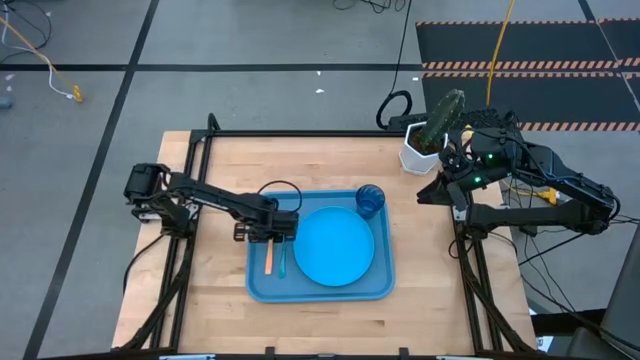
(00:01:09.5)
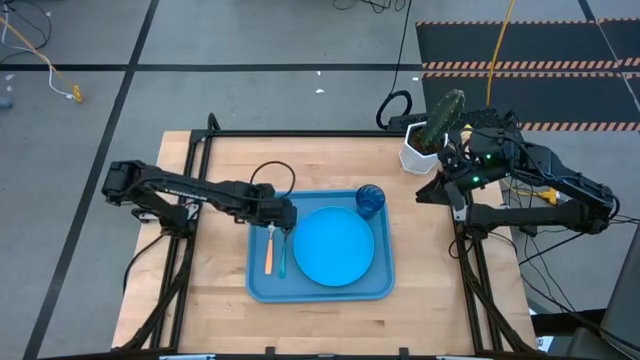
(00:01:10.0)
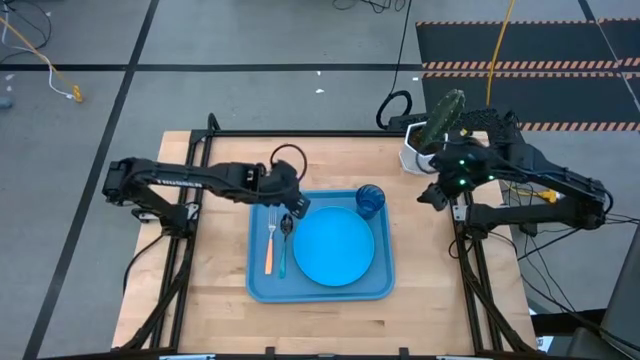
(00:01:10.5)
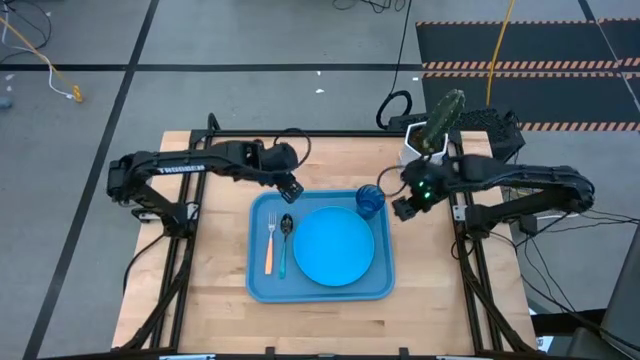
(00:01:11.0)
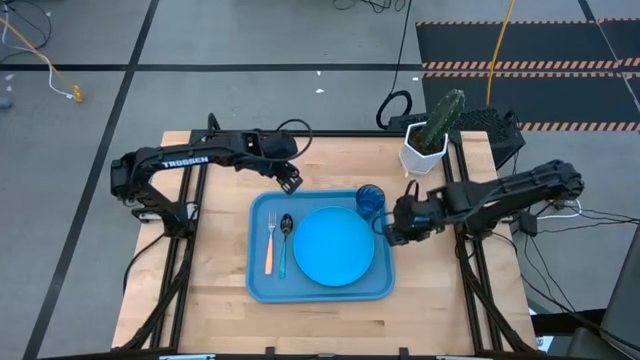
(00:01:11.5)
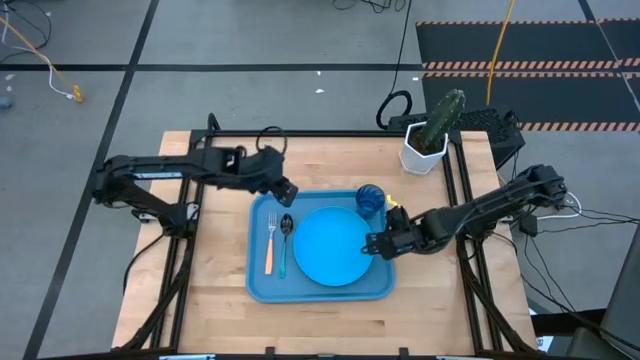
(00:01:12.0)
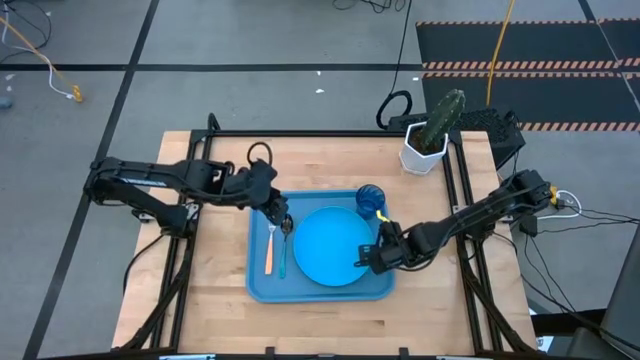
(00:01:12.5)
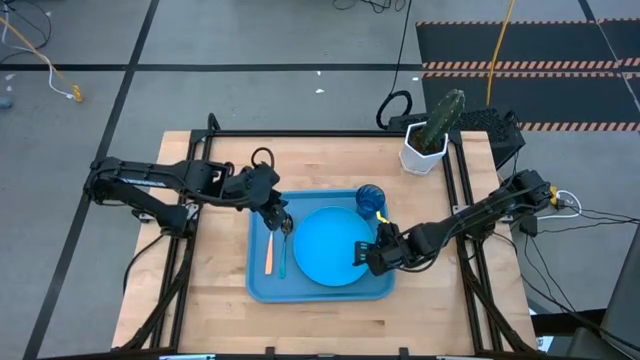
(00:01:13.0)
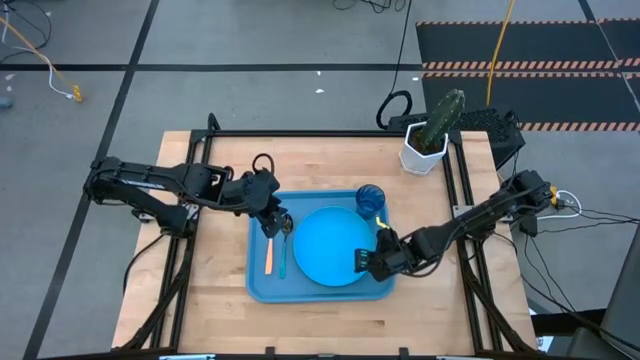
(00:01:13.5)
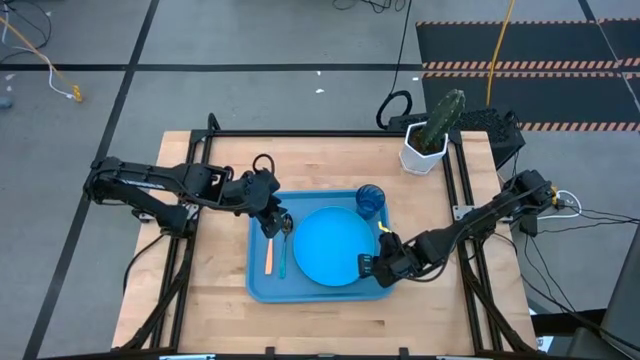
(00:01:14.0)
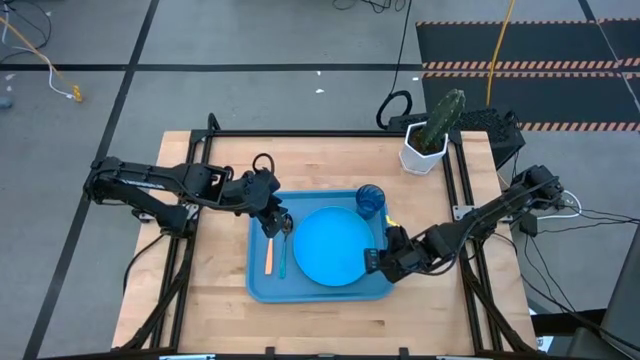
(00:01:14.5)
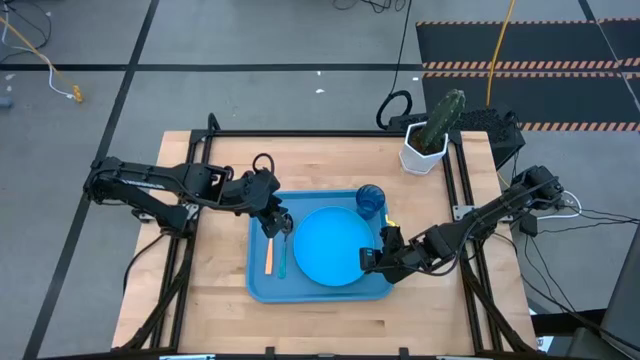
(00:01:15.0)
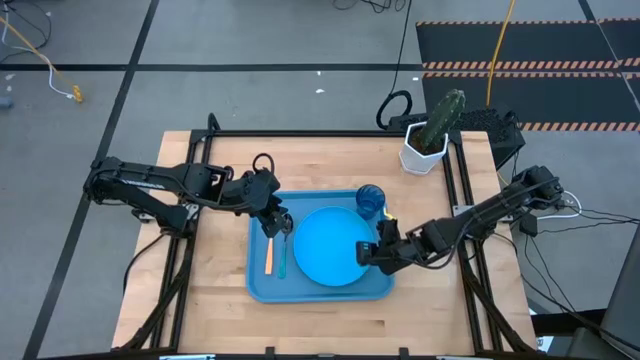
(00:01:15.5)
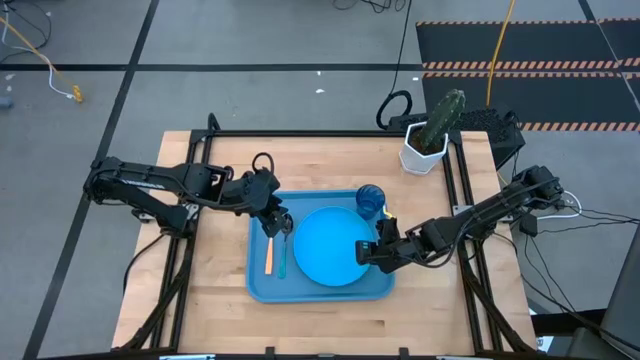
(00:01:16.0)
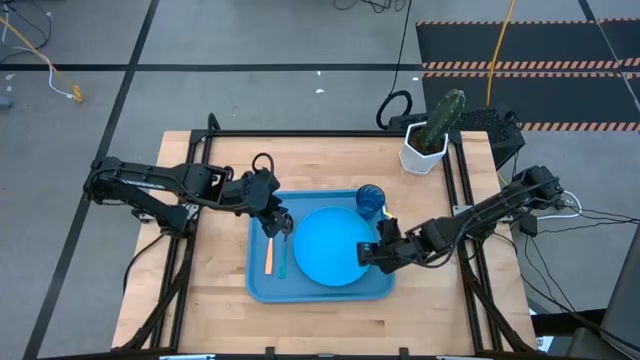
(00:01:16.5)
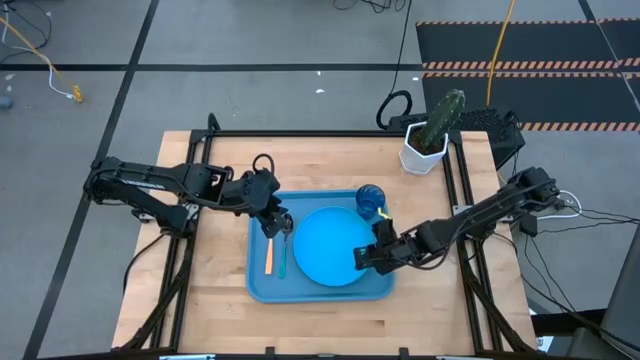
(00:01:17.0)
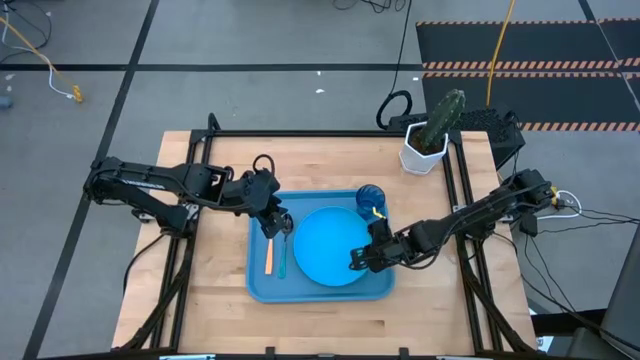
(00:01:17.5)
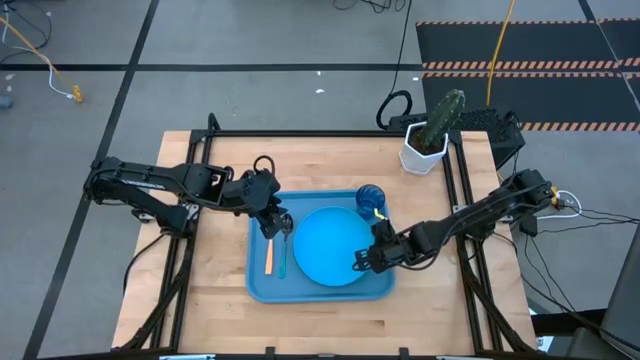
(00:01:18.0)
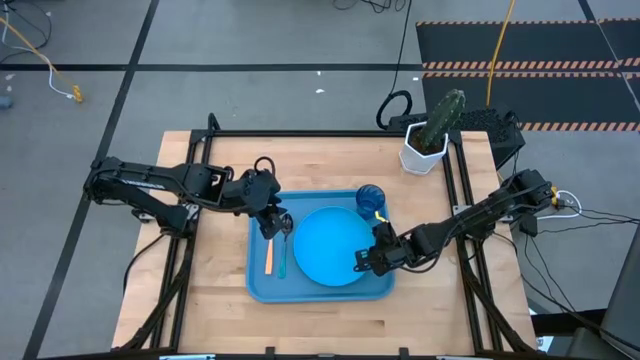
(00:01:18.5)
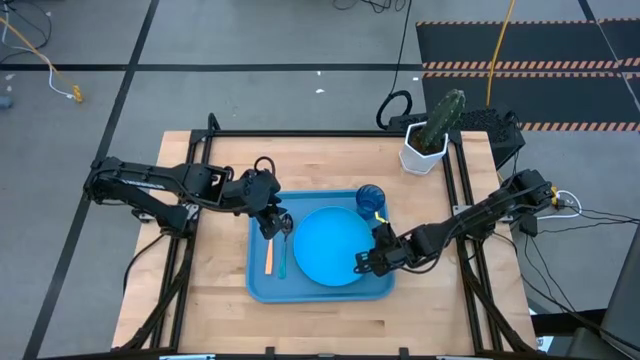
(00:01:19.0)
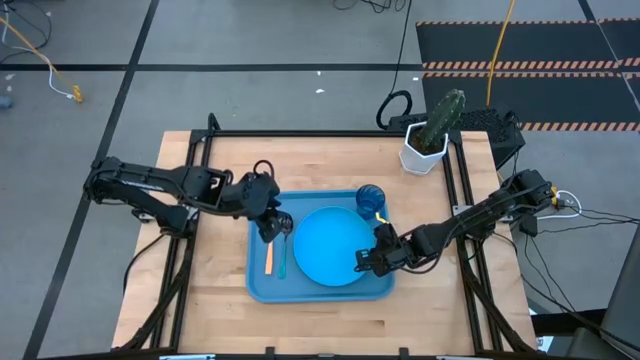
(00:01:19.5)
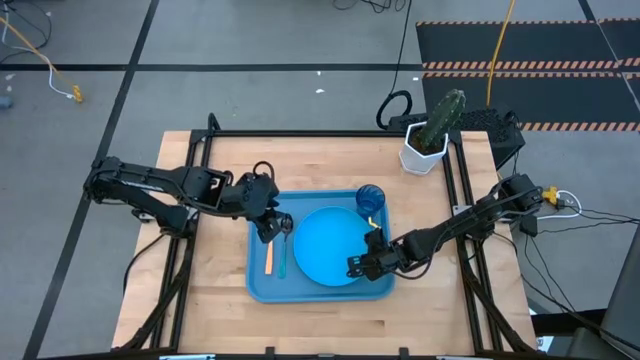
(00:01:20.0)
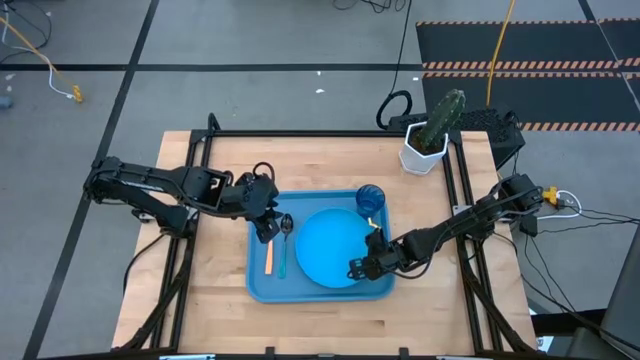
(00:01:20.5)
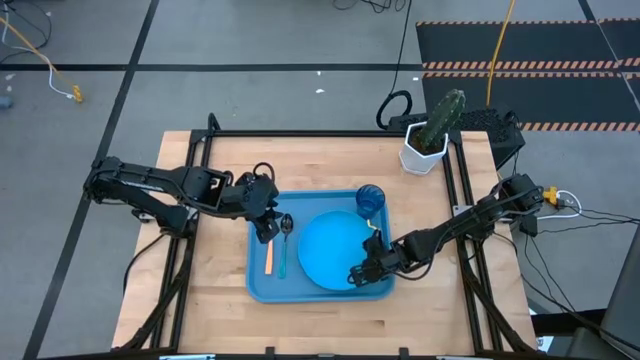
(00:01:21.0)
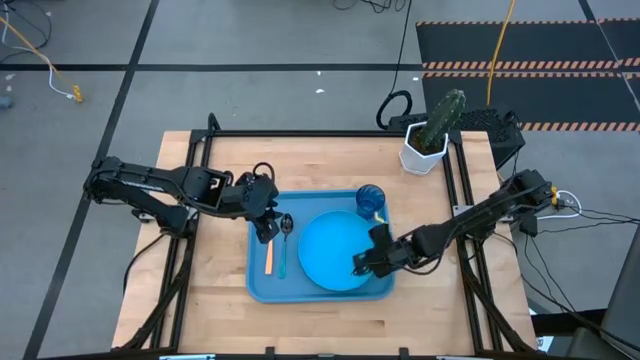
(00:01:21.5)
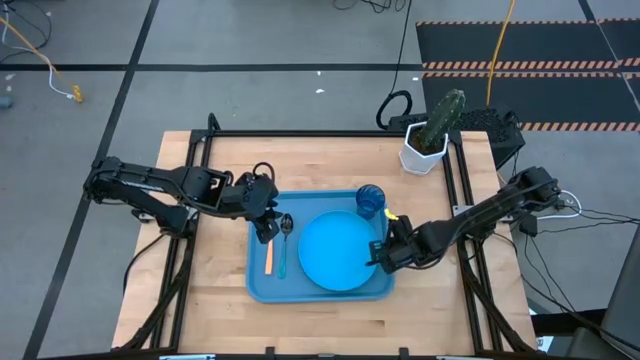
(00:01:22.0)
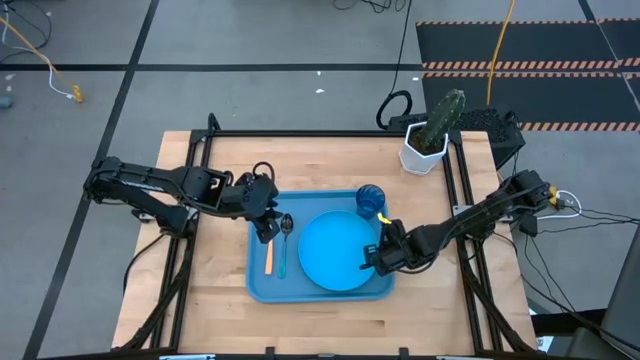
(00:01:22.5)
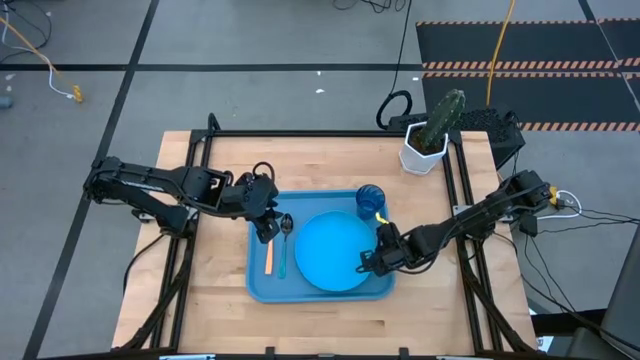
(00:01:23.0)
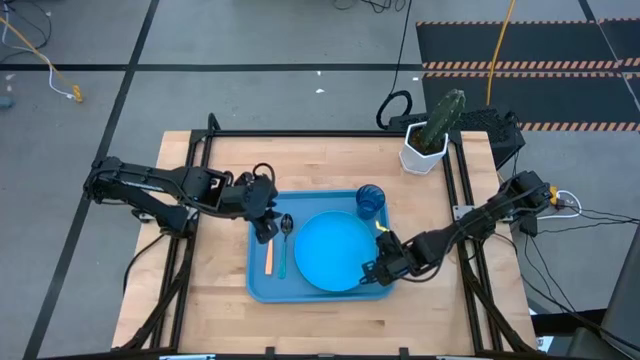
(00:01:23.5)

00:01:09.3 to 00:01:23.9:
Task: Pick and place plate/cup/fork/spoon on tray
Adjust the light blue plate

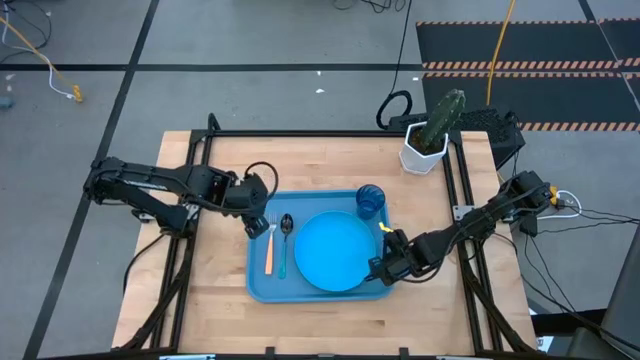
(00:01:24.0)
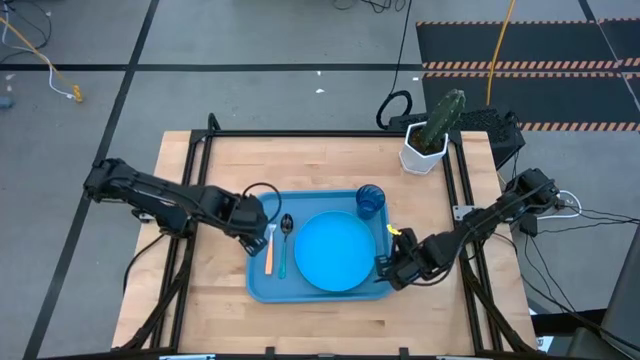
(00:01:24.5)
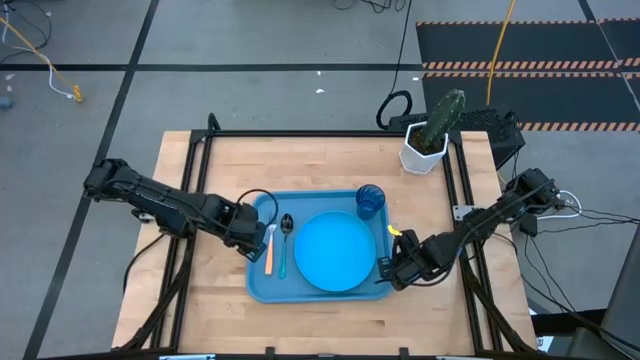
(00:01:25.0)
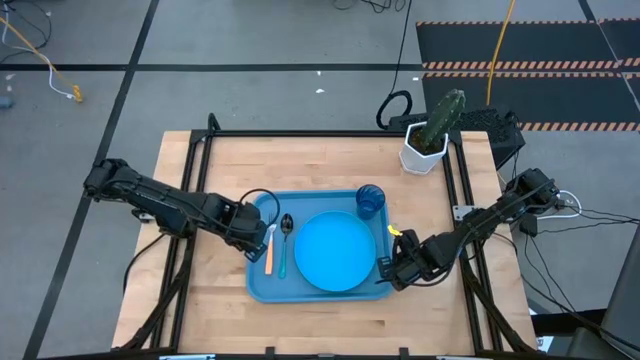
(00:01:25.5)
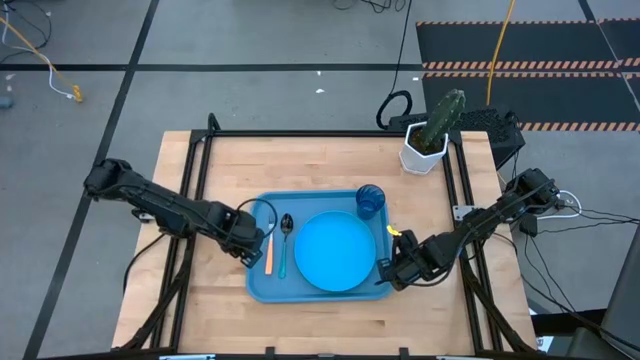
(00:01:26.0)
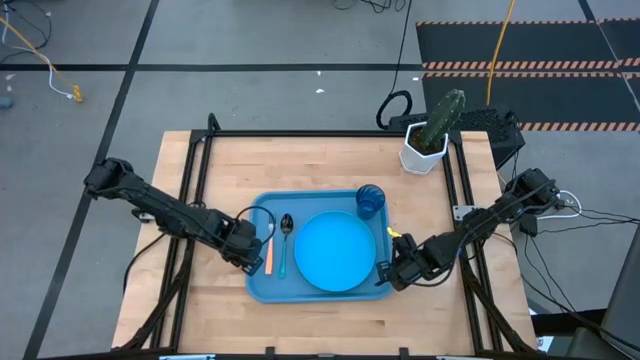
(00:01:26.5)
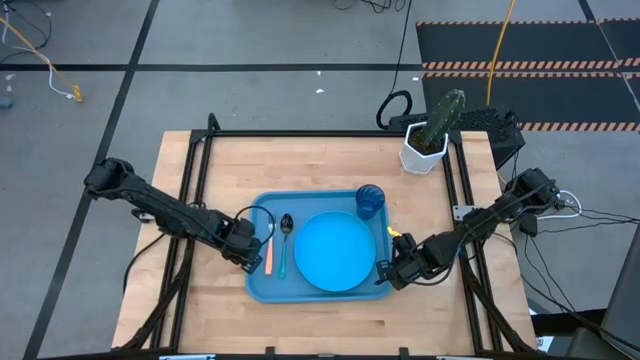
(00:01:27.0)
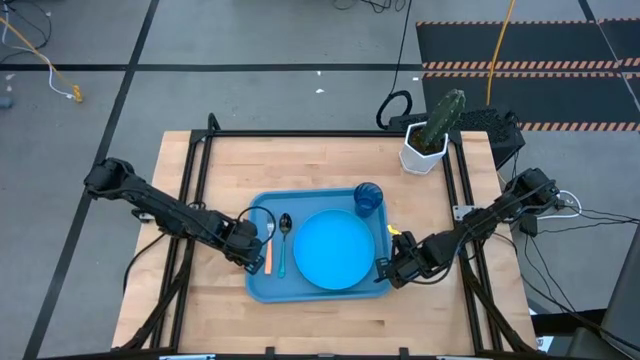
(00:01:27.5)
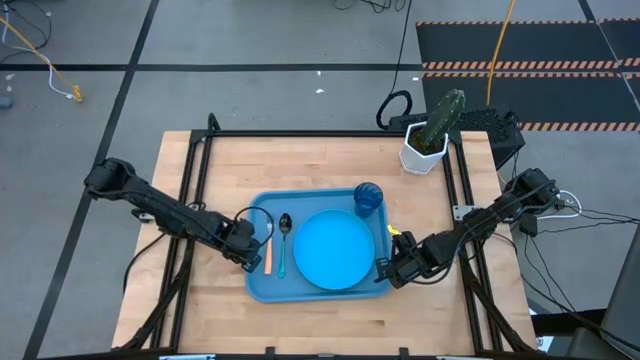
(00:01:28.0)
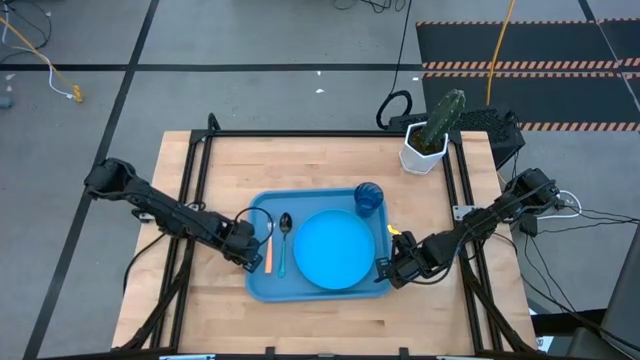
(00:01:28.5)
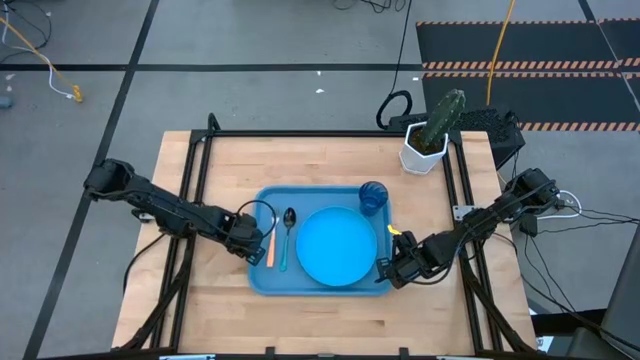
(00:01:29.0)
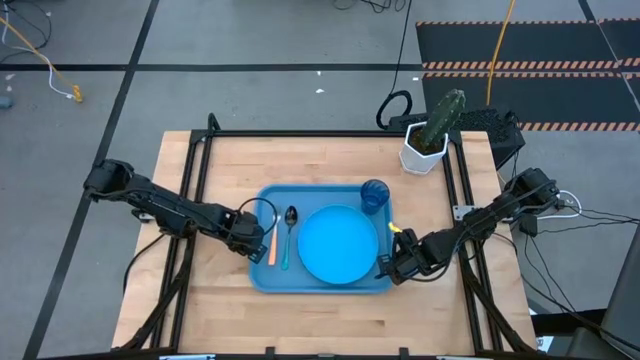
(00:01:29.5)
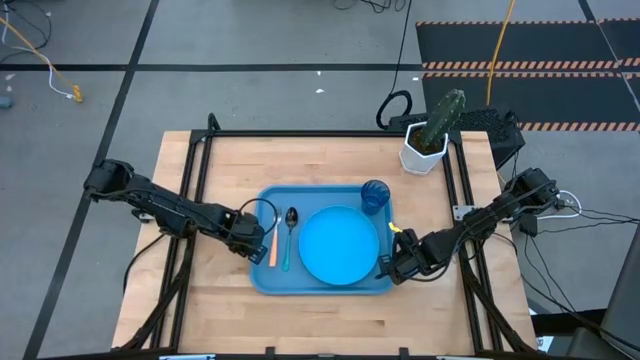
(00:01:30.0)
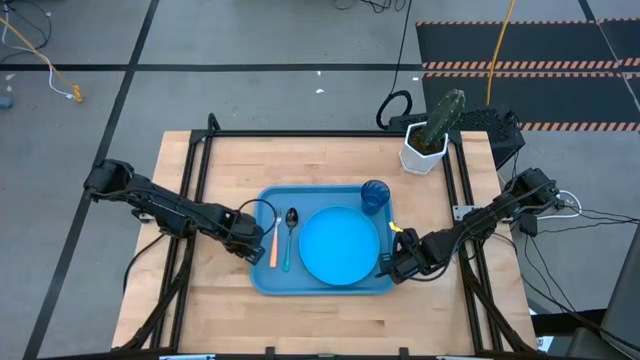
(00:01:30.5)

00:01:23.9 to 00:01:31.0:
Adjust the blue tray
